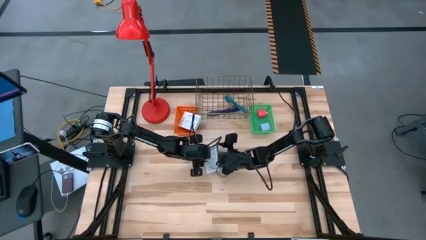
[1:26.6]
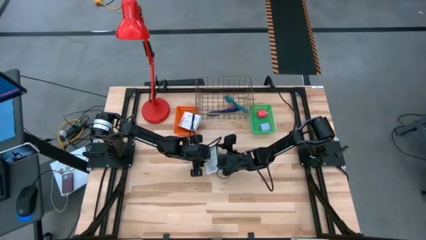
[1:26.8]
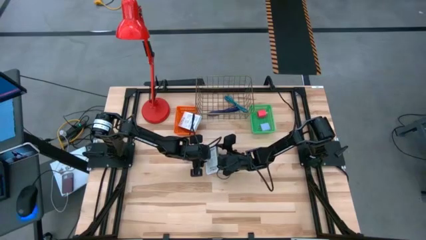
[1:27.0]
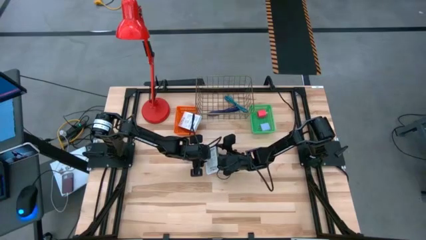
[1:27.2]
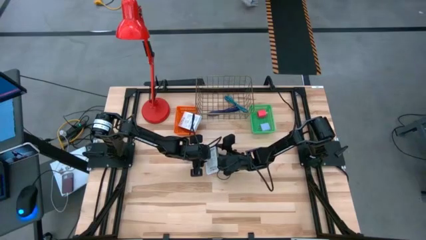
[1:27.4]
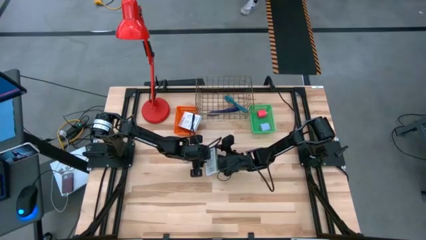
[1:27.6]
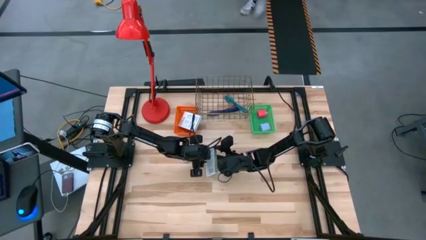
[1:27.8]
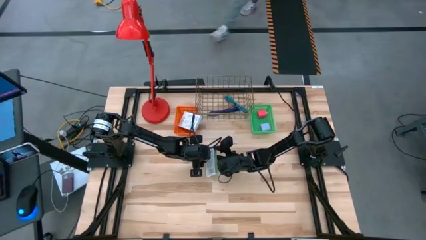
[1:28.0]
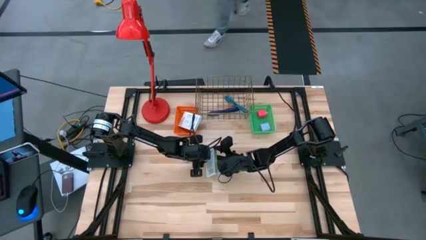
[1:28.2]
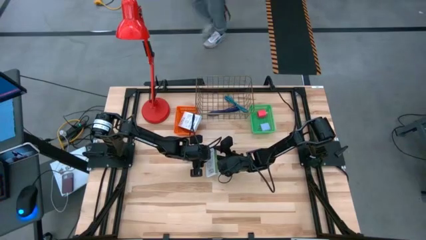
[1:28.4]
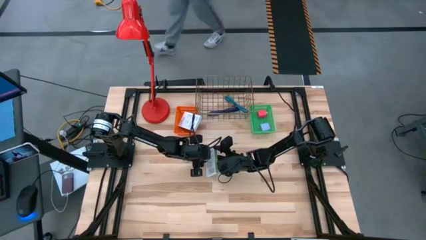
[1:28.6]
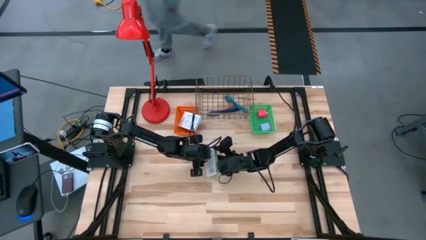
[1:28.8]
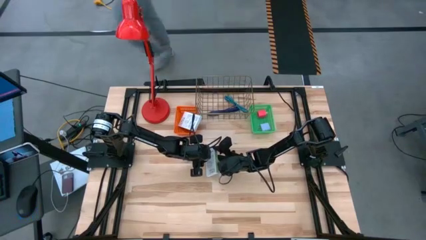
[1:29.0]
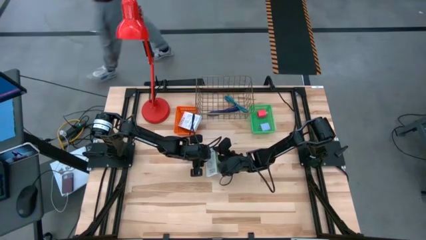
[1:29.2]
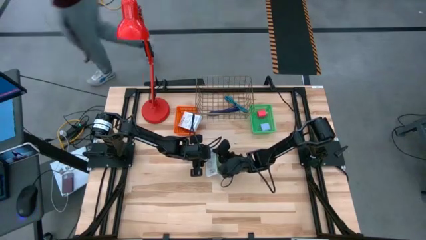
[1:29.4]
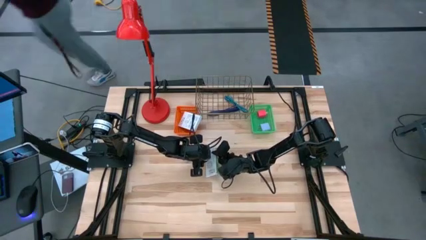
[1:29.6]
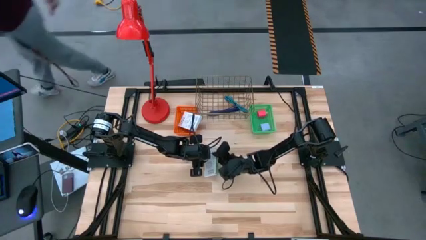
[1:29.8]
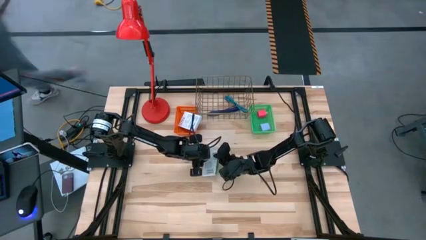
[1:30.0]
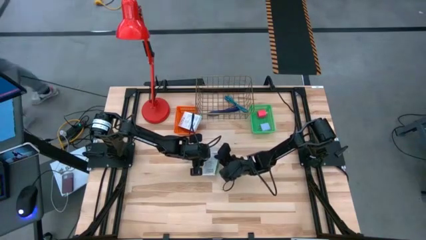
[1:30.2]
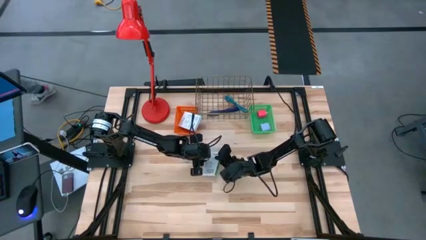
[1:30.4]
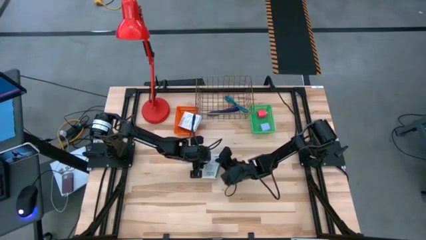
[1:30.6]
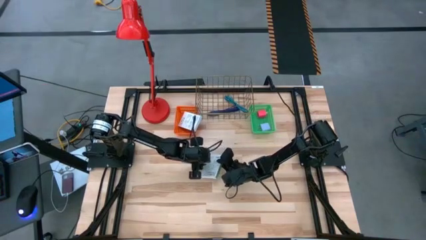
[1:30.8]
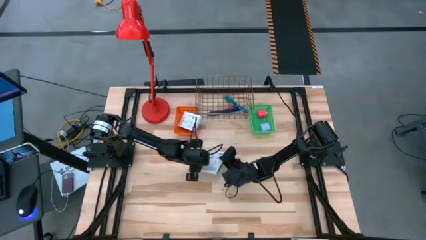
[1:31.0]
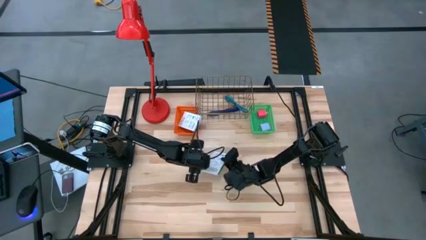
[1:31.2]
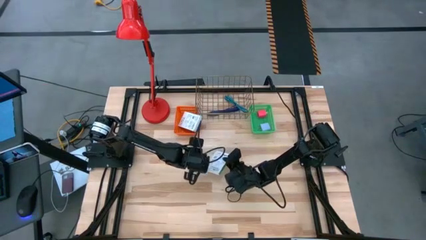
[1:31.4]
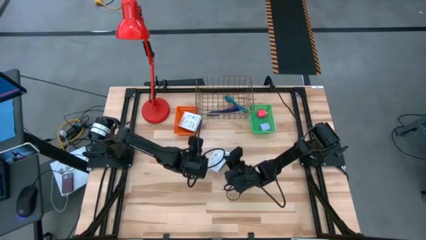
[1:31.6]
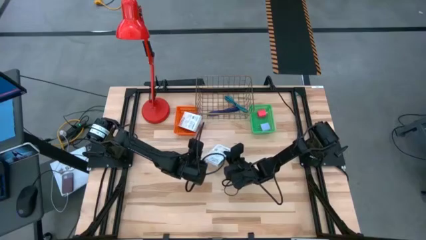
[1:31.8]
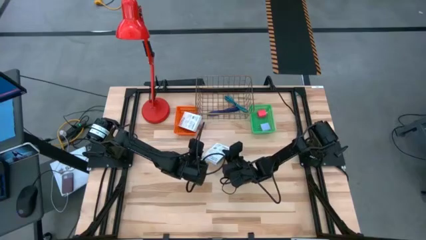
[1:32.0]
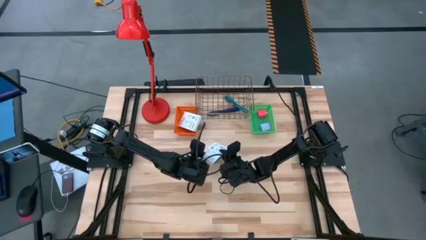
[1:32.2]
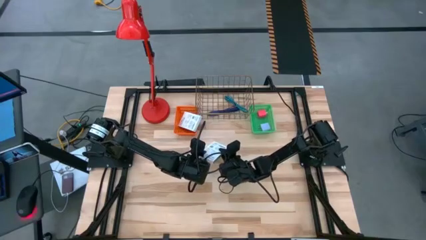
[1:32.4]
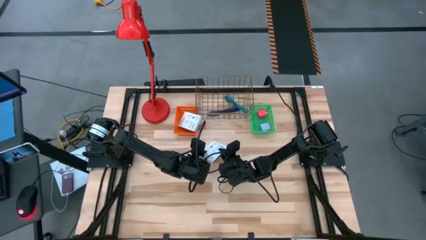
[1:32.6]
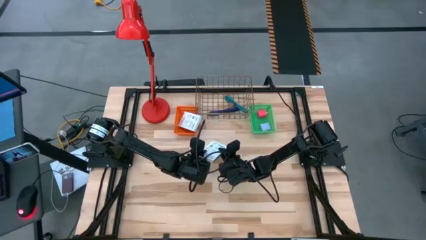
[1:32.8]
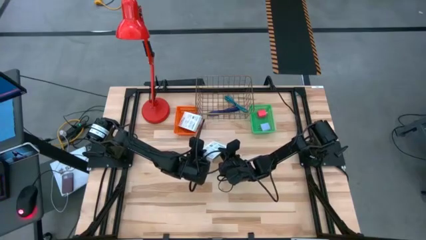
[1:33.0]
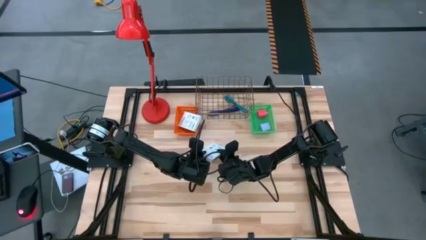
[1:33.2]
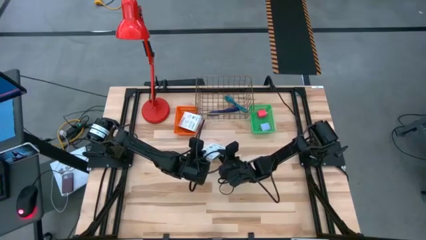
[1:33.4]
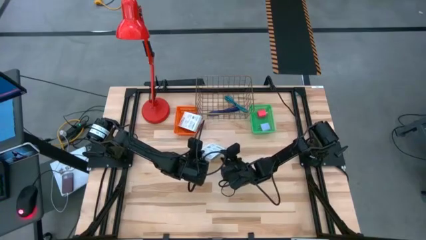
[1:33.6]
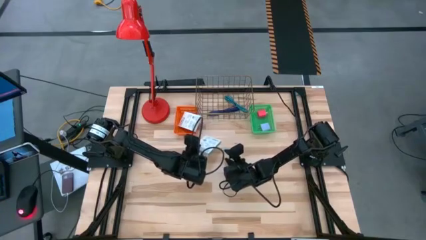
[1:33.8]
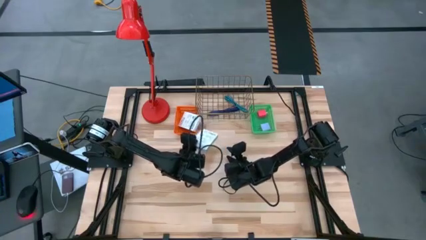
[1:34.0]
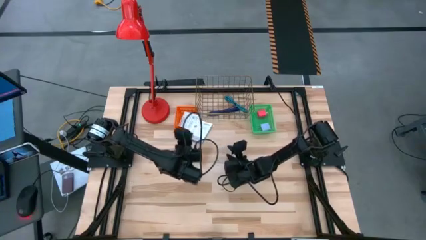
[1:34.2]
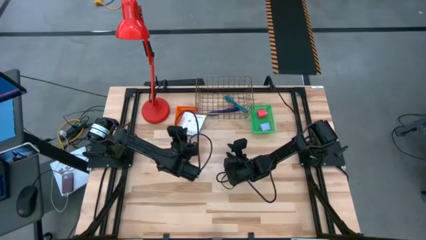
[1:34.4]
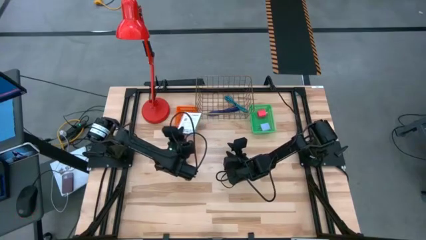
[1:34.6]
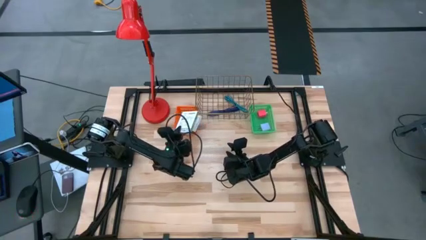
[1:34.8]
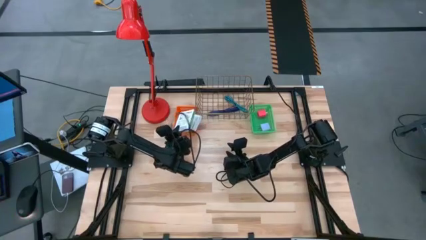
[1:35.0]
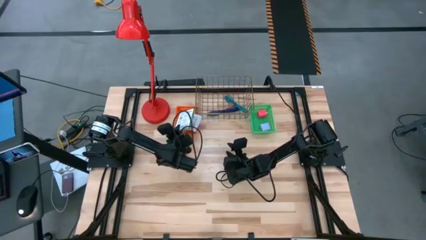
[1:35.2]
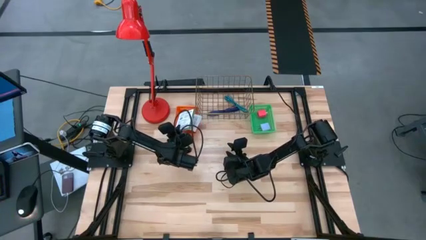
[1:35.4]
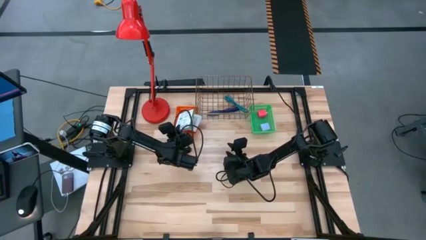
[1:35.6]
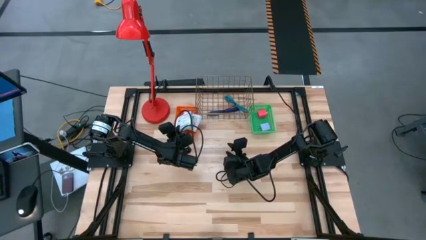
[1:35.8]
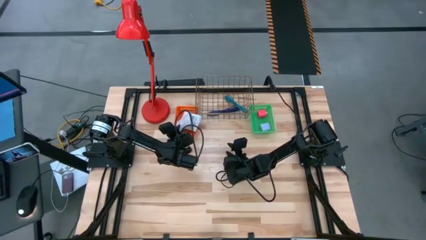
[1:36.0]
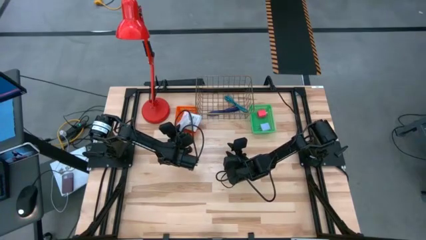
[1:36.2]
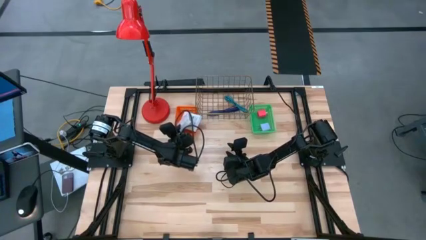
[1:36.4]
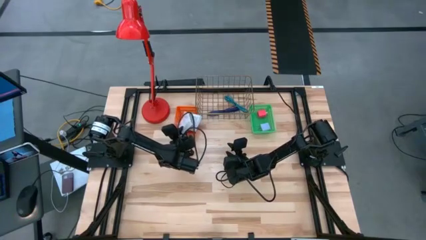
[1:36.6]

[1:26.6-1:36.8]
Task: Pick and place items into bin
Put the card reader box into the orange bin

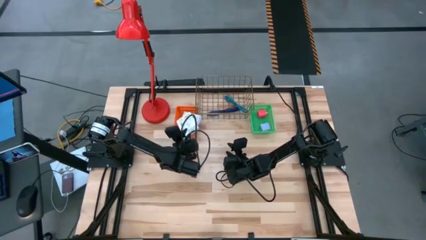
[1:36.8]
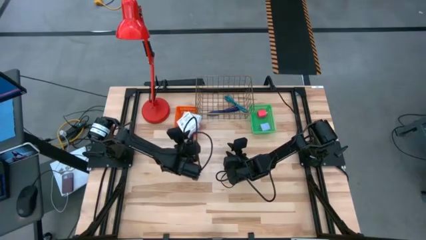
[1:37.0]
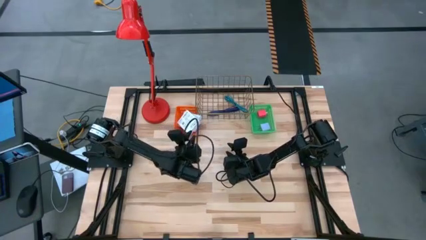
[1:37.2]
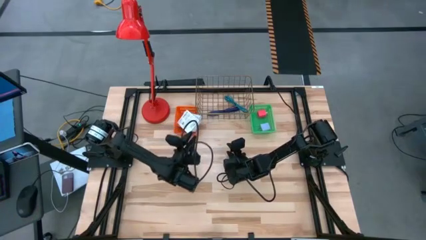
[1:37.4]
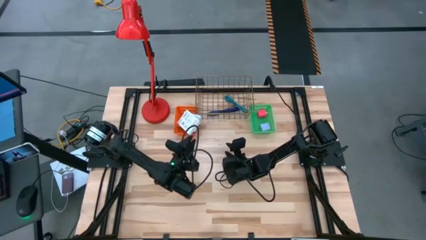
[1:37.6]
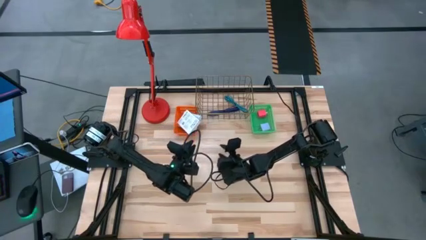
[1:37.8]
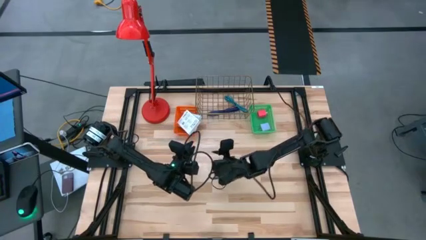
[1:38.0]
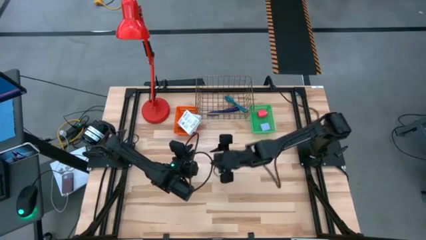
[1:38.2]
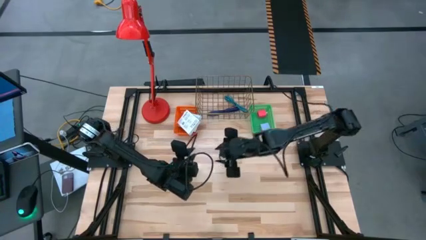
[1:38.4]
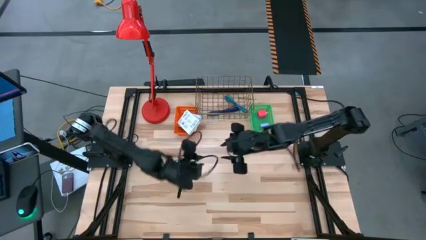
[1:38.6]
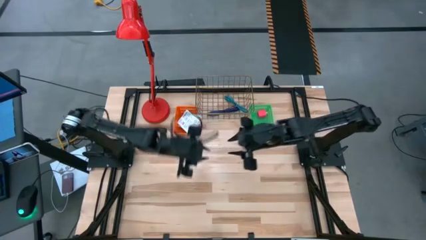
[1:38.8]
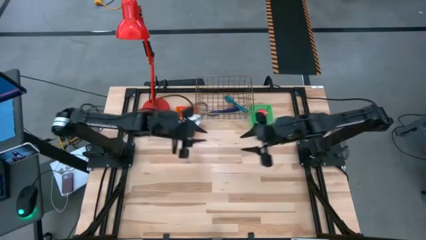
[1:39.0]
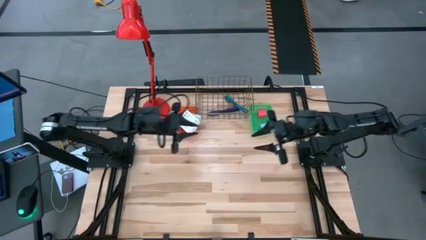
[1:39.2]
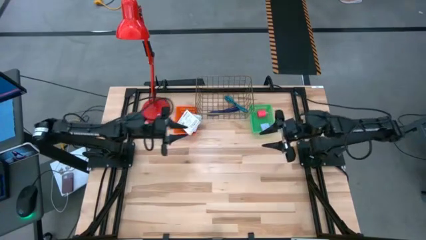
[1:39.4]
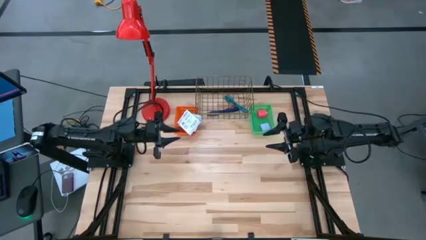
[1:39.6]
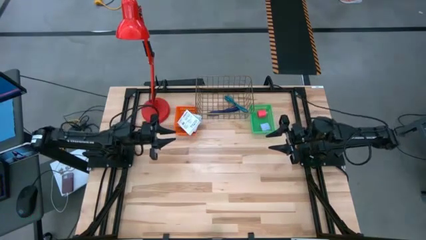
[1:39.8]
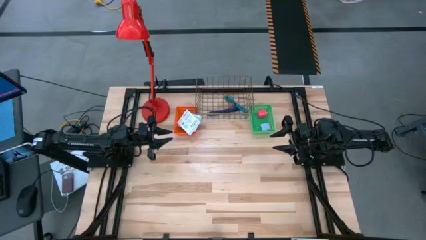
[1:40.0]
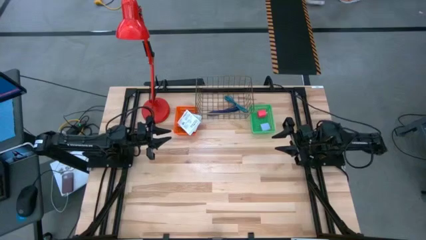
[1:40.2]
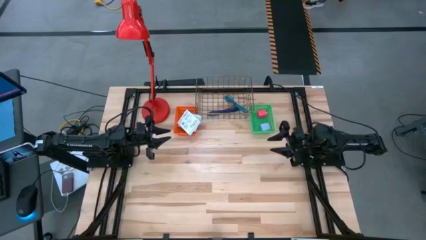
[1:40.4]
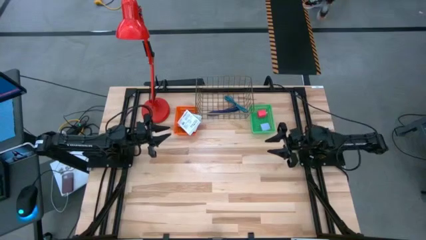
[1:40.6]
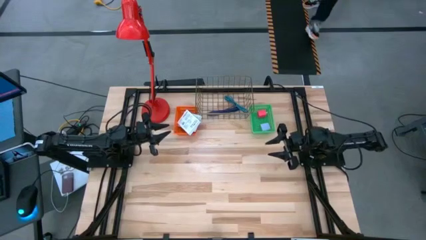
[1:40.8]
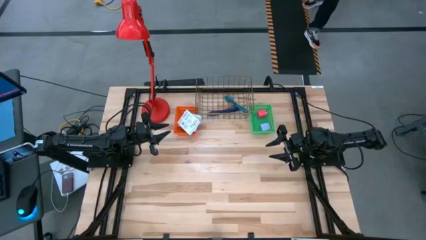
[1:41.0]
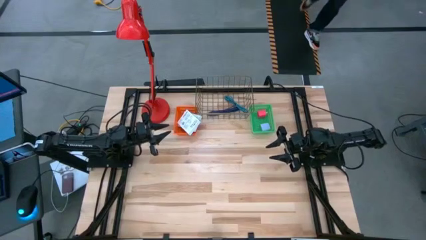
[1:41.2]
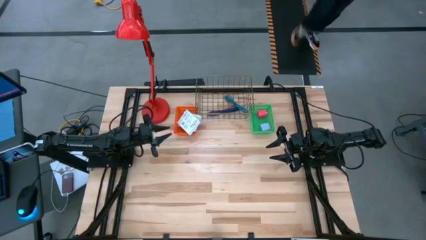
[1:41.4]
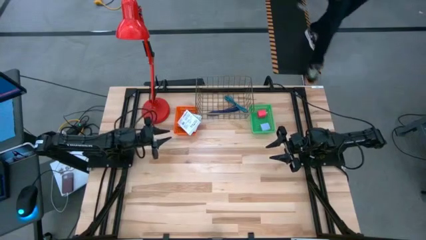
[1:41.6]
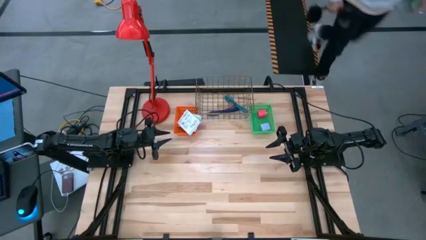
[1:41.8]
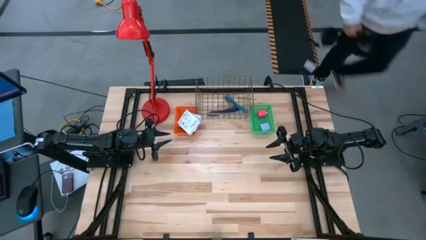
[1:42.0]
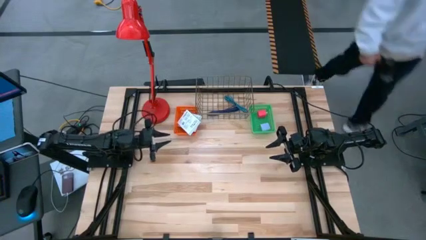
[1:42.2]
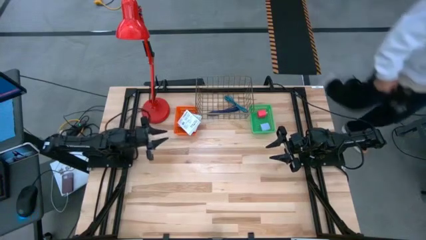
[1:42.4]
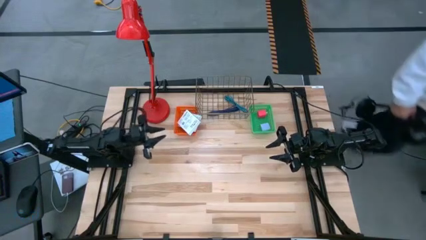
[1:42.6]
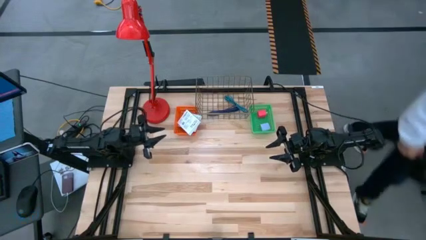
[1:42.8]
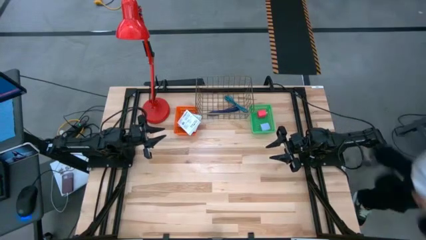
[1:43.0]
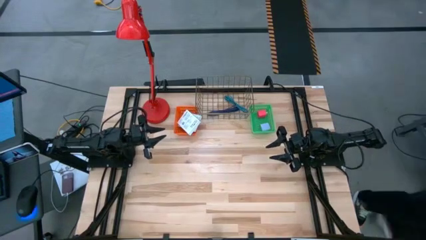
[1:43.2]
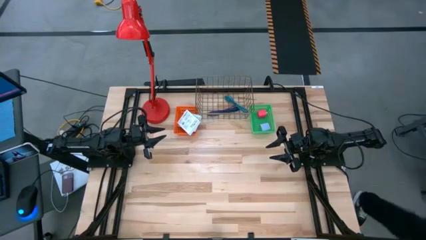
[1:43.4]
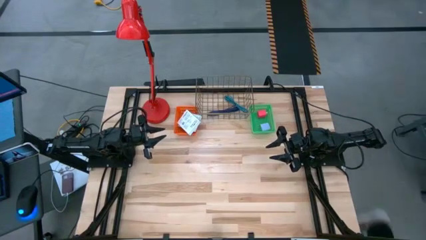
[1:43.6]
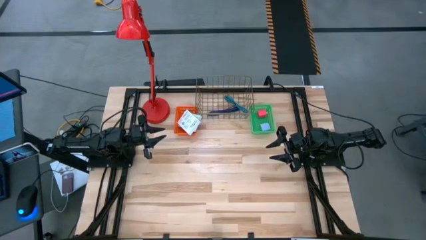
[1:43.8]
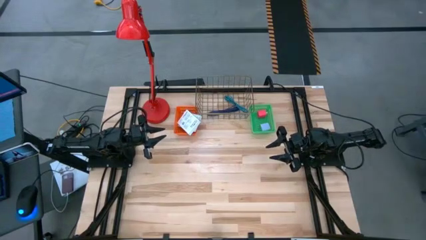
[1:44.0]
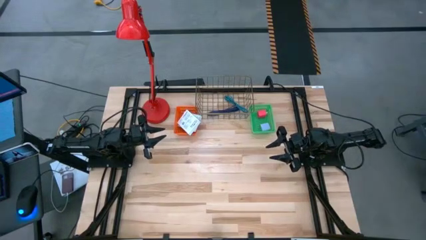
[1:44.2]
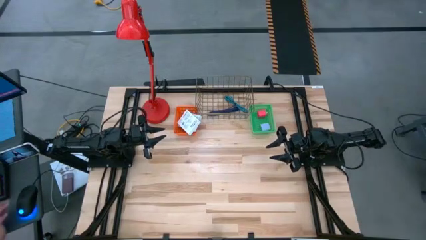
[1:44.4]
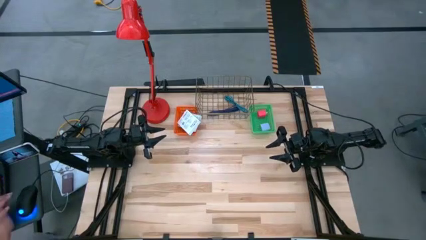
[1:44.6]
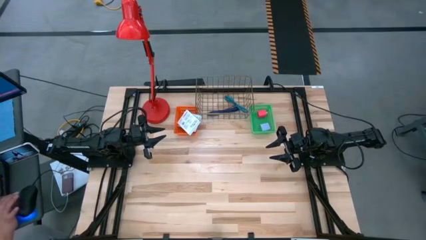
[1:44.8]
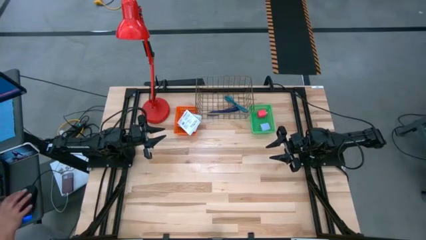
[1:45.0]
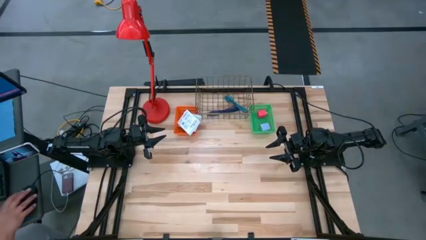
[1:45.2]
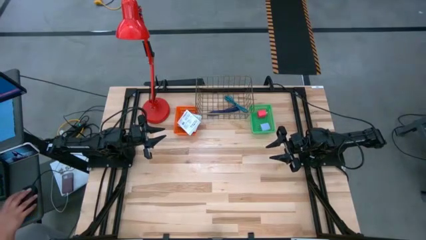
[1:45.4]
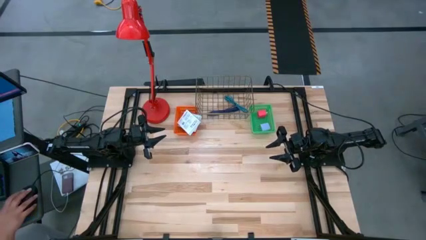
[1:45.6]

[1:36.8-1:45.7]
Return to Home Position
